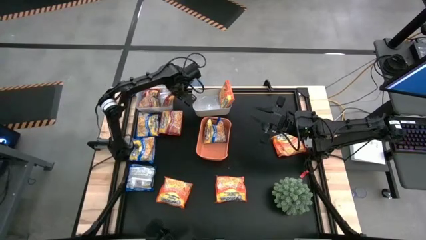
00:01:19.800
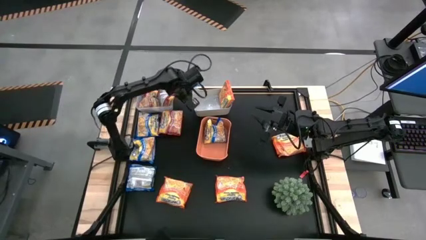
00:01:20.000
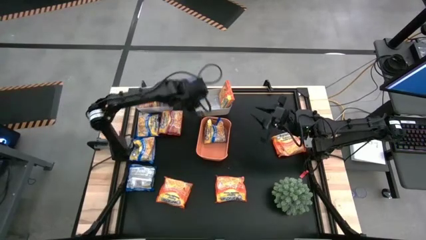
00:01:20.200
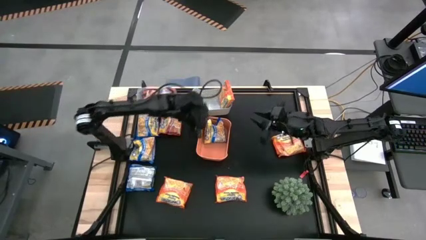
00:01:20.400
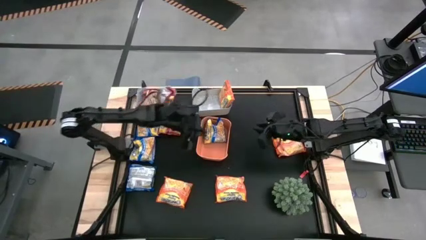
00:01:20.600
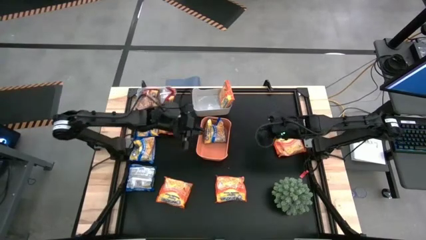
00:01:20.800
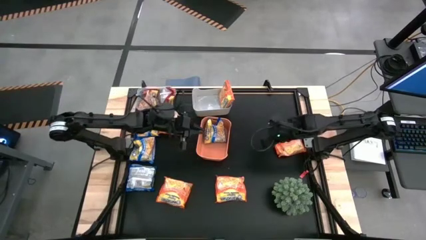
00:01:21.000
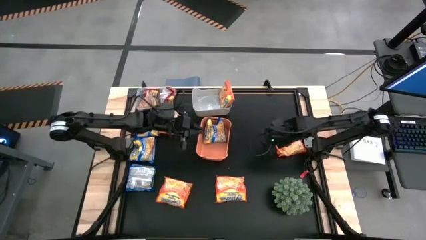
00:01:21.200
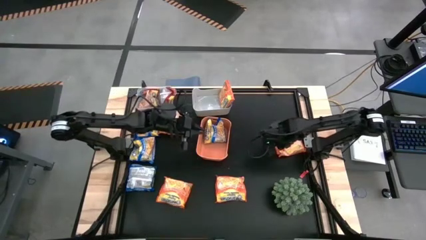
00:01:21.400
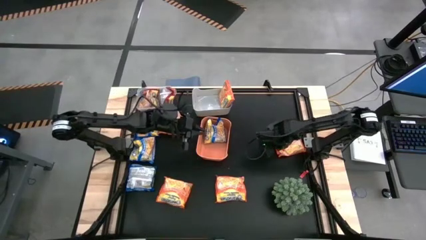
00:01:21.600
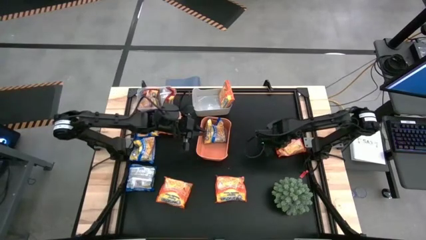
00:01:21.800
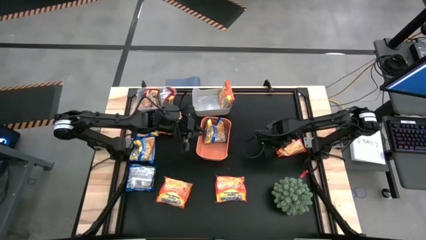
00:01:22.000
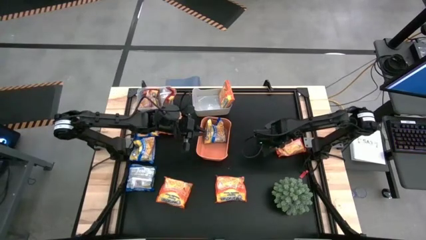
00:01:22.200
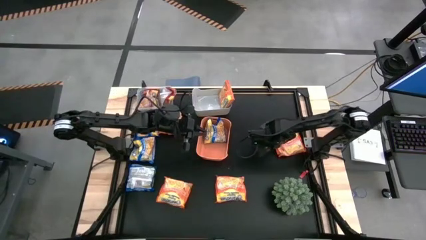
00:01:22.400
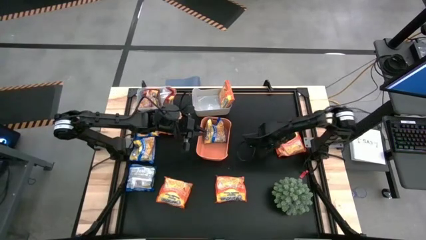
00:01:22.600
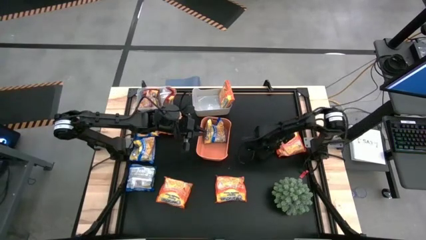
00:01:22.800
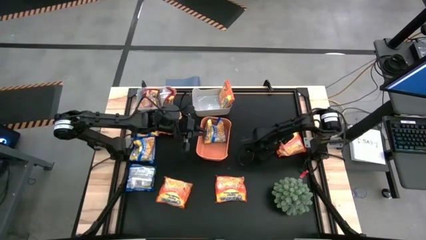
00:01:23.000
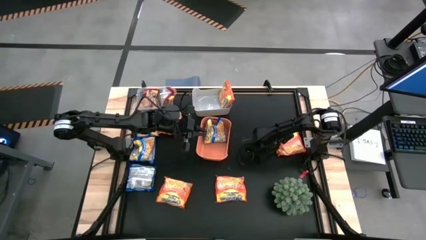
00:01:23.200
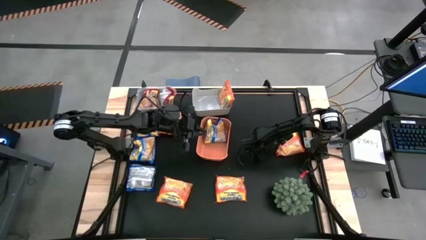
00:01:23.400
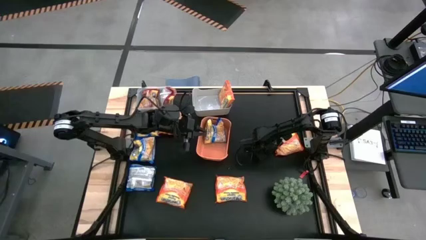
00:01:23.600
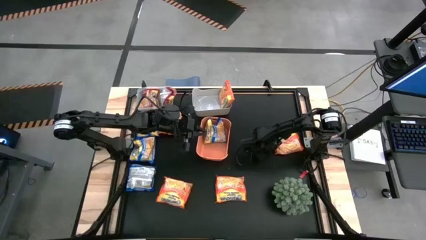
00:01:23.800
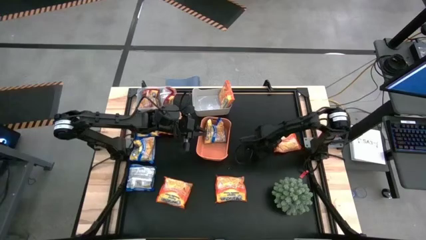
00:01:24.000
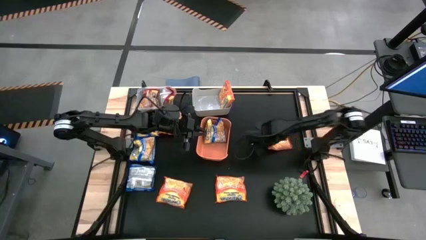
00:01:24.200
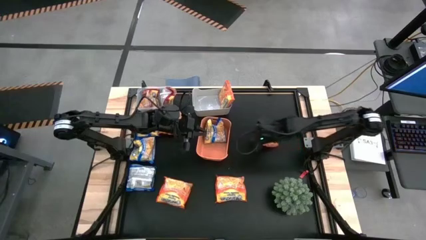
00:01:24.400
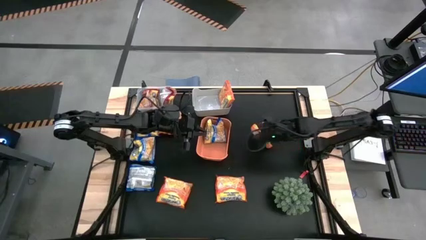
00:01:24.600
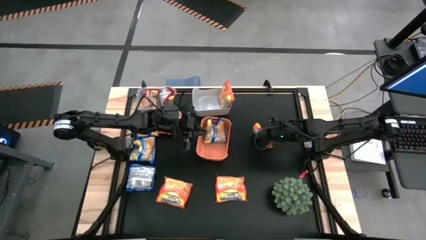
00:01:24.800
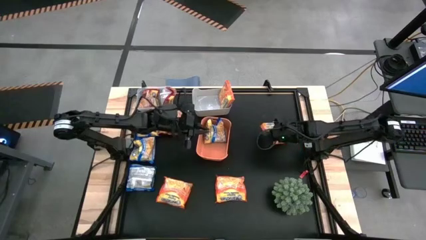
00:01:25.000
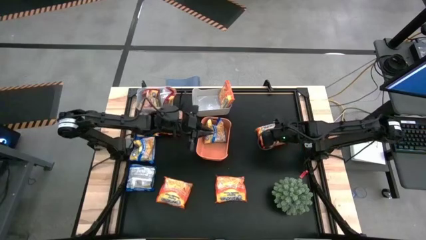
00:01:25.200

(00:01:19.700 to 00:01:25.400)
Task: Sort Maruchan noodles
Put the orange bag into the white bin

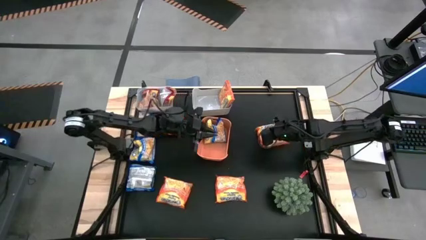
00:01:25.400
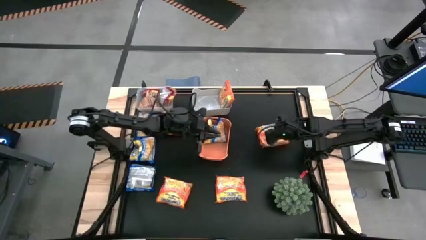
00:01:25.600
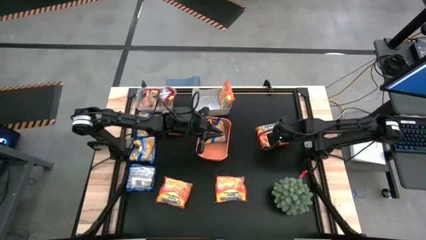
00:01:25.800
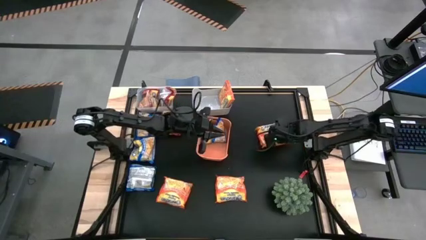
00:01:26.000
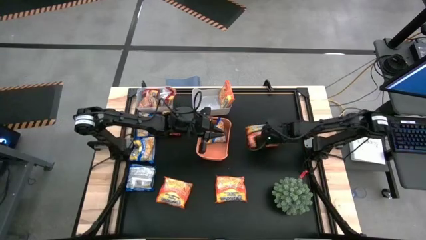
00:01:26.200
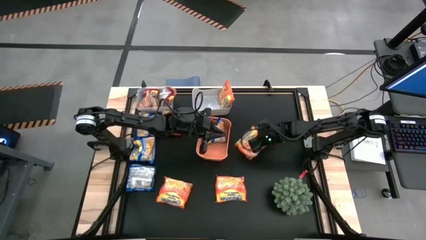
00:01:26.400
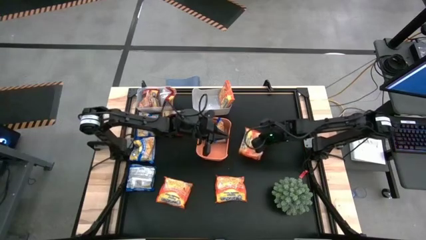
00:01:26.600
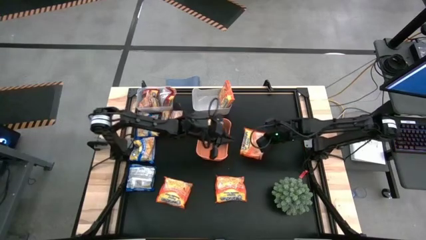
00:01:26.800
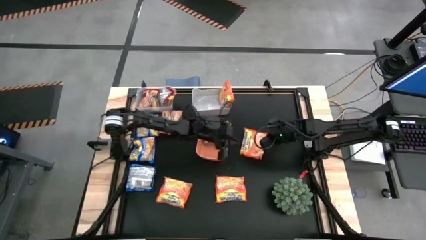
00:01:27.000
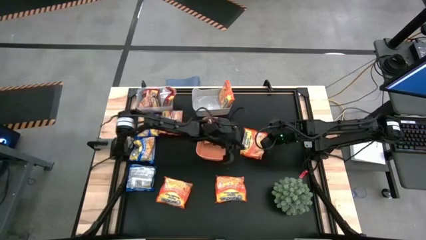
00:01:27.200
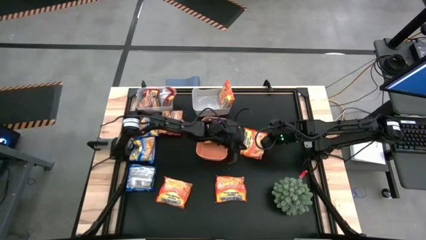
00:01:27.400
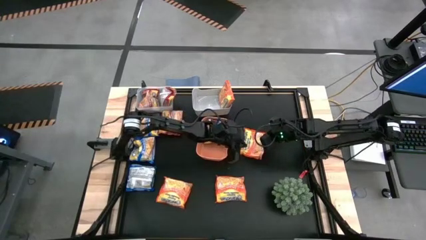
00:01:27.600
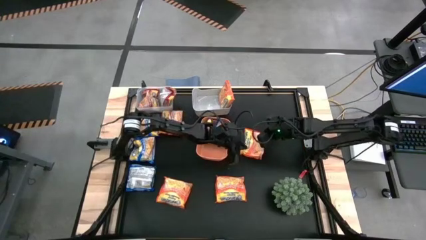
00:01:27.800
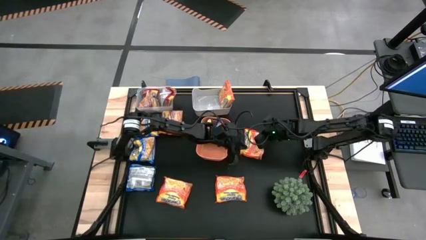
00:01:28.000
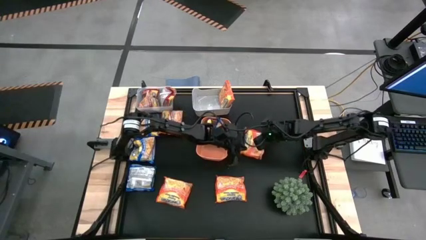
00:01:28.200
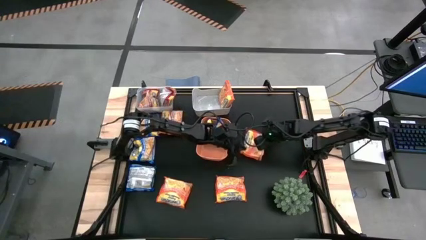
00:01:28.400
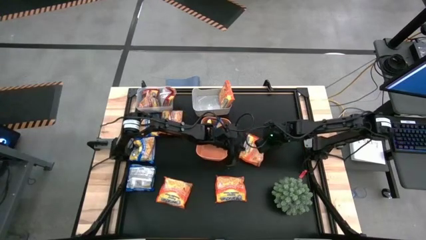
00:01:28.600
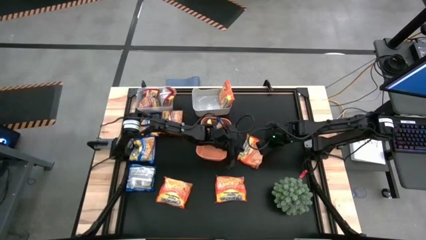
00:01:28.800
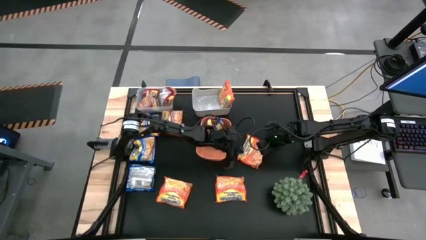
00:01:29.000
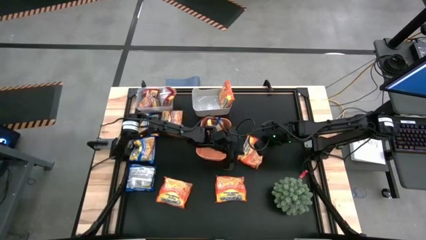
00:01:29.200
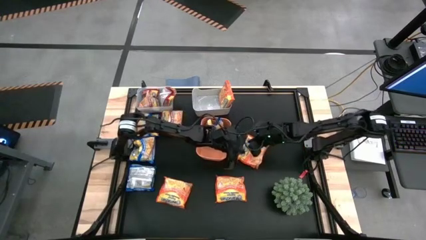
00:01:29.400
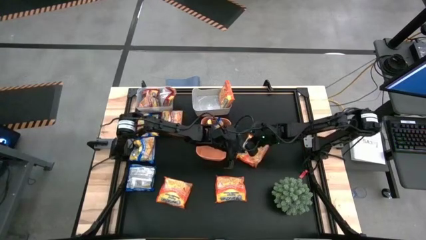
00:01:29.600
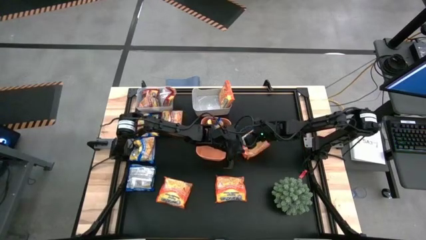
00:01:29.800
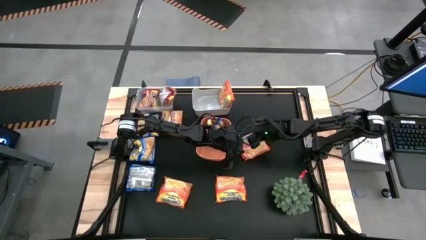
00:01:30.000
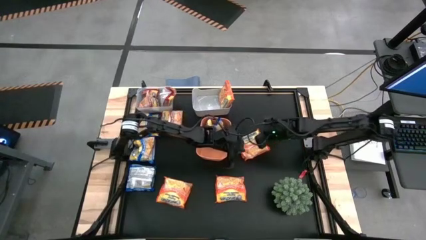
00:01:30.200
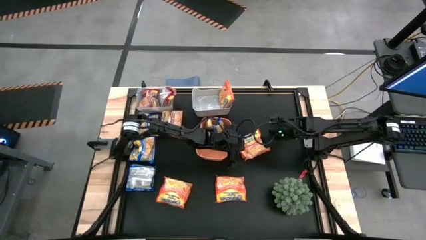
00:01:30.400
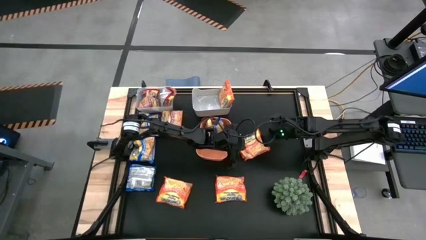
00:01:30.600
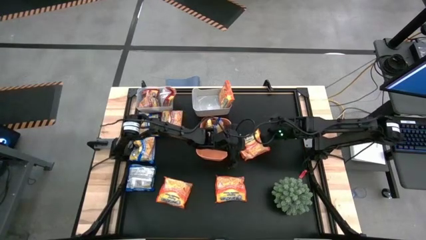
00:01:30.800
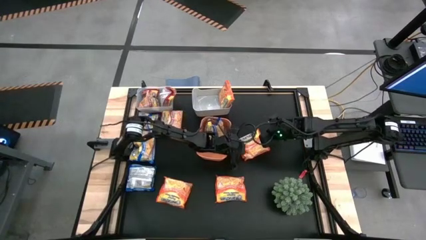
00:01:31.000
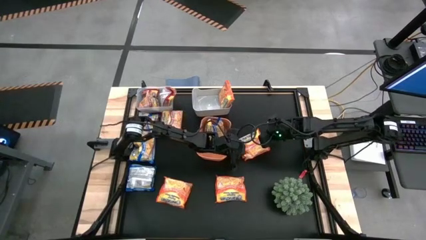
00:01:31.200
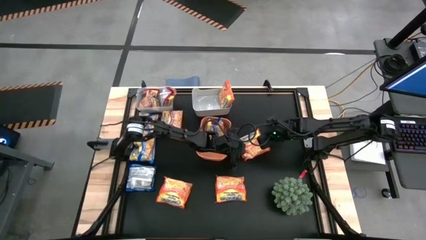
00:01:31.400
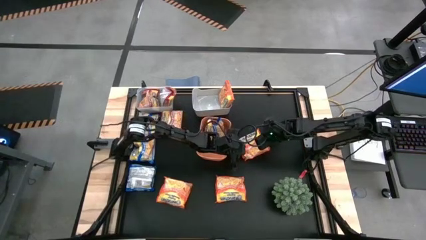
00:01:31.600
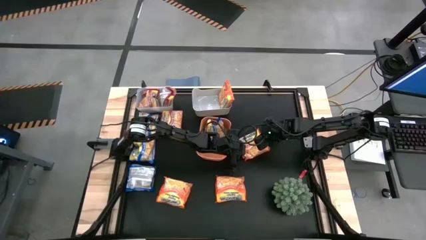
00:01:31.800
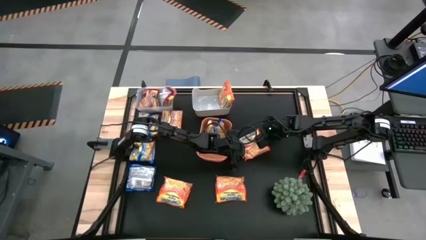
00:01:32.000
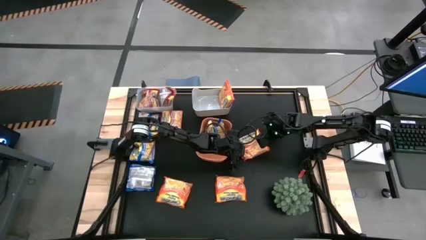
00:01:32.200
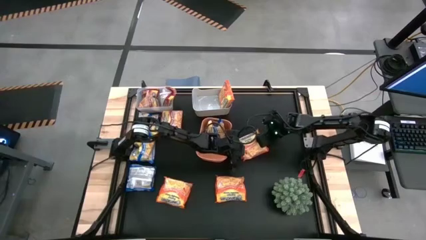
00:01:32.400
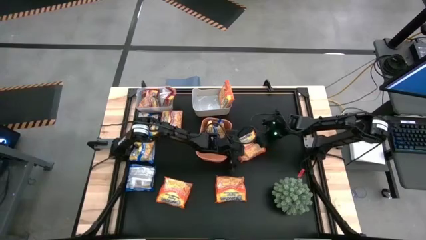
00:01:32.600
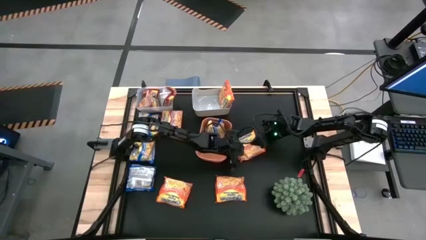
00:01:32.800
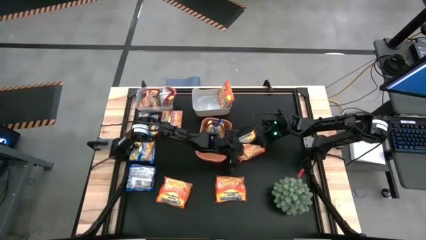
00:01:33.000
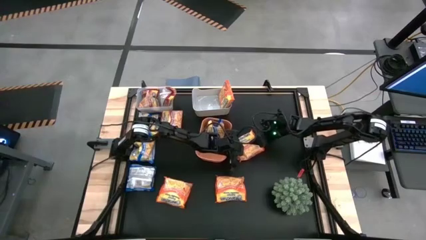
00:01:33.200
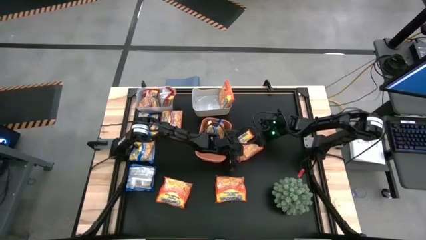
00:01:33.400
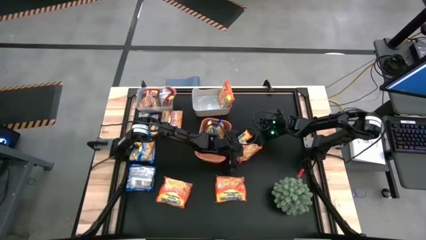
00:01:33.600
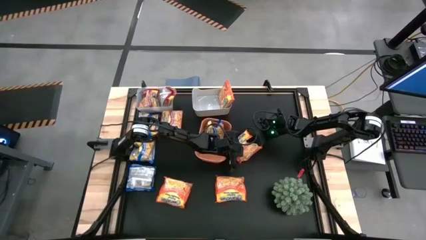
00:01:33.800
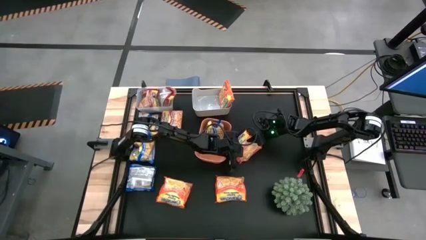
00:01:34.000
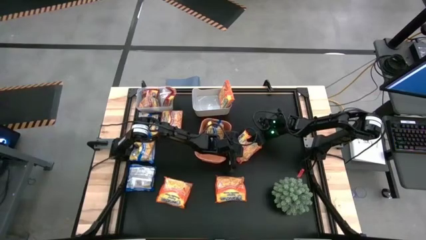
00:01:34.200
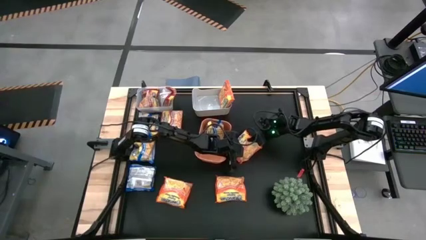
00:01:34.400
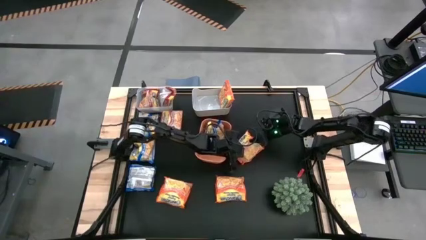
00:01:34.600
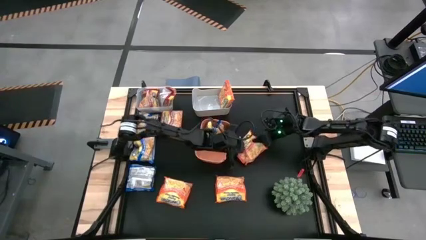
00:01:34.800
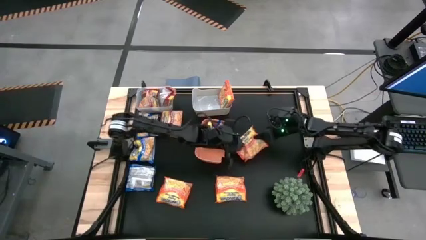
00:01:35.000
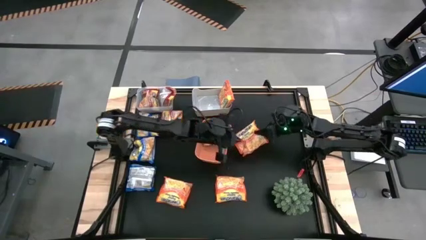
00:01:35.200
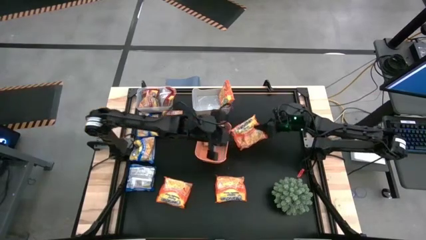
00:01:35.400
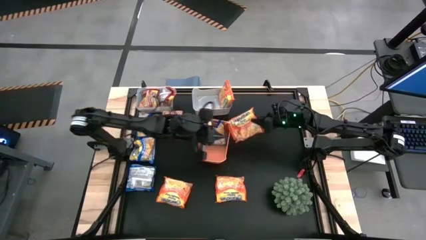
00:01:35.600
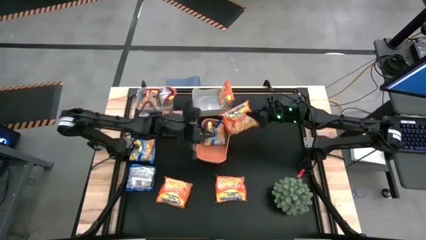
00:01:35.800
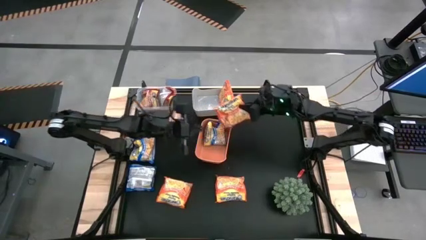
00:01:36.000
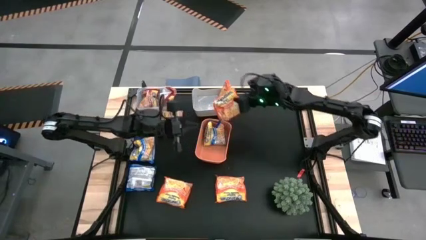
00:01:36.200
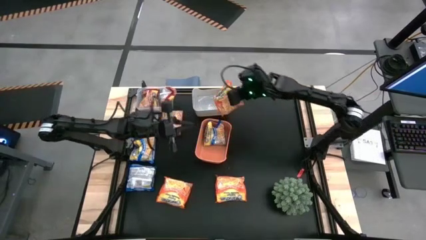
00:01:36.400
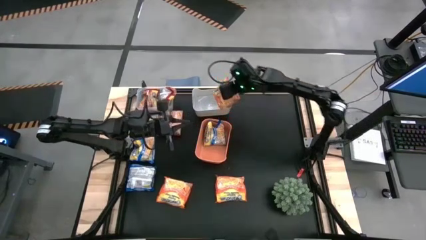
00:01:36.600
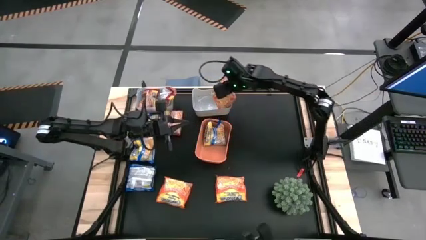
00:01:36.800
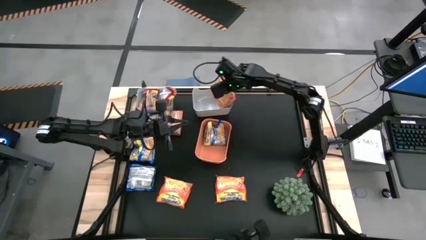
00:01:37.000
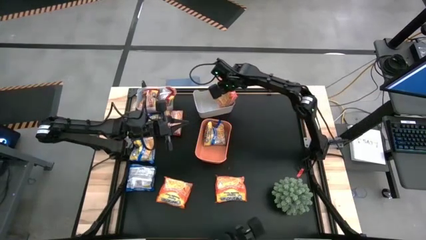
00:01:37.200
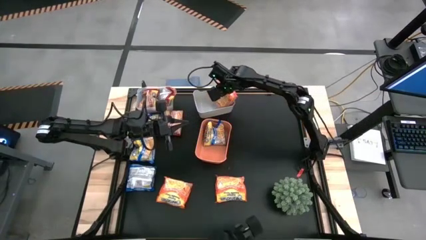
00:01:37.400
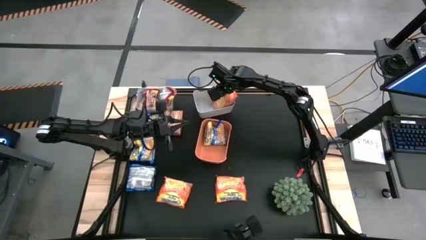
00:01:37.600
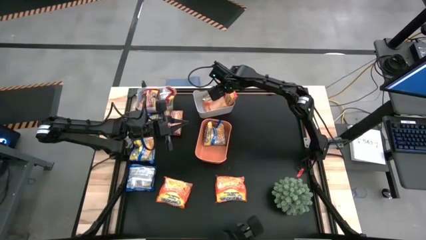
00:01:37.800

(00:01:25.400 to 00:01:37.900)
Put the orange bag into the white bin
